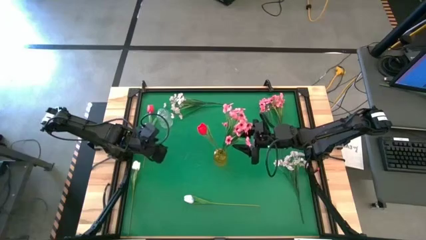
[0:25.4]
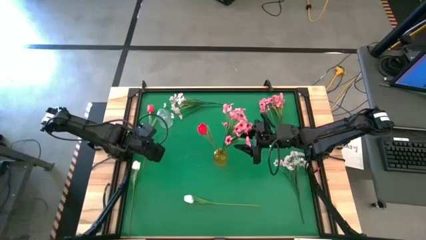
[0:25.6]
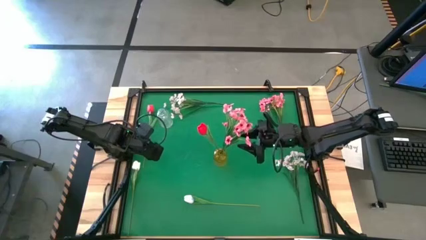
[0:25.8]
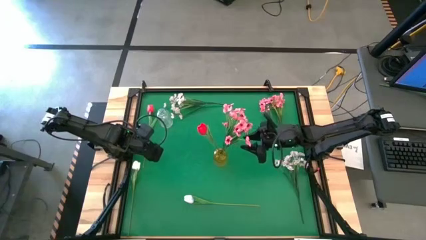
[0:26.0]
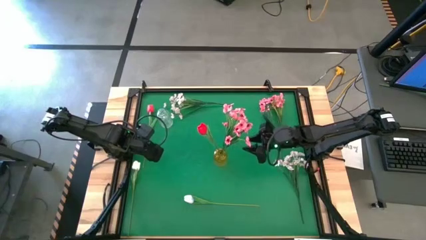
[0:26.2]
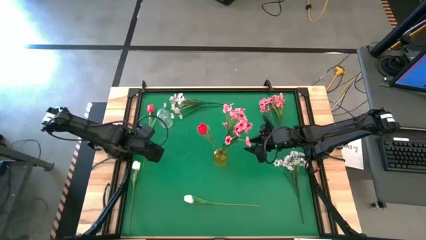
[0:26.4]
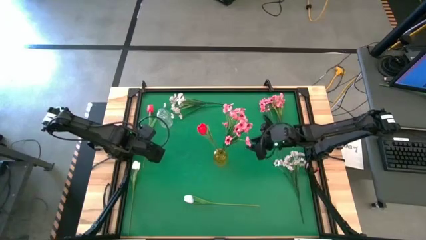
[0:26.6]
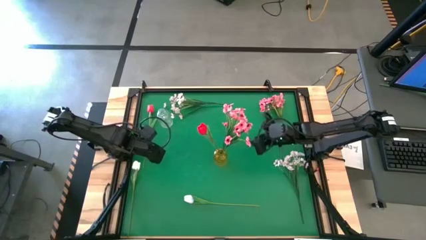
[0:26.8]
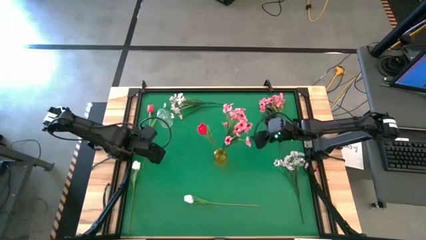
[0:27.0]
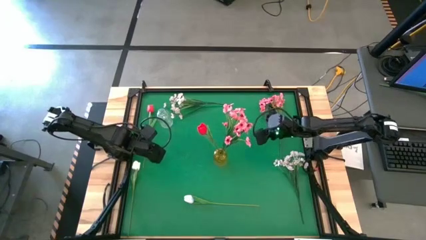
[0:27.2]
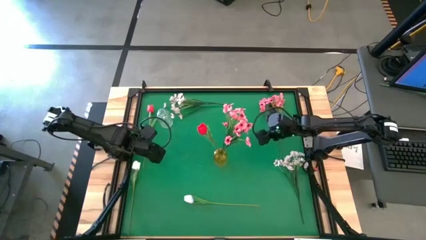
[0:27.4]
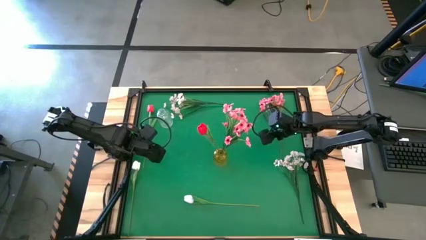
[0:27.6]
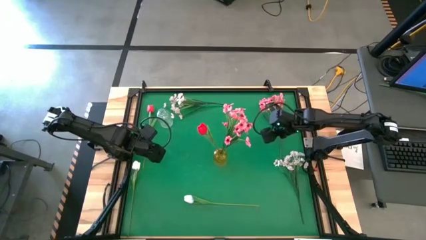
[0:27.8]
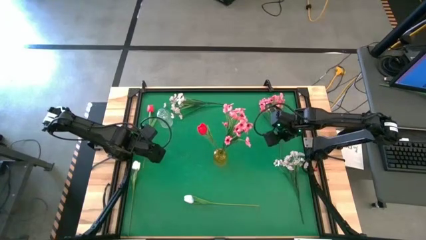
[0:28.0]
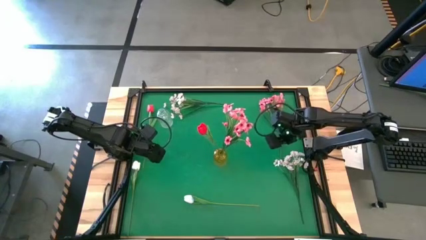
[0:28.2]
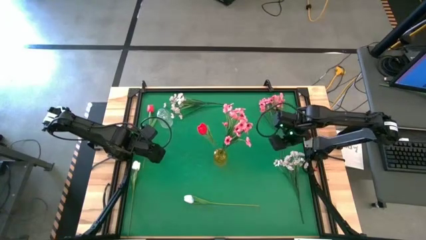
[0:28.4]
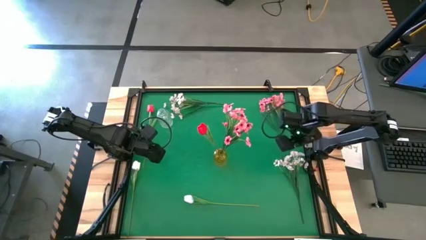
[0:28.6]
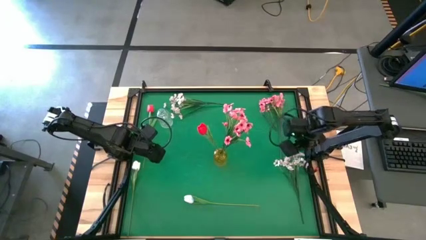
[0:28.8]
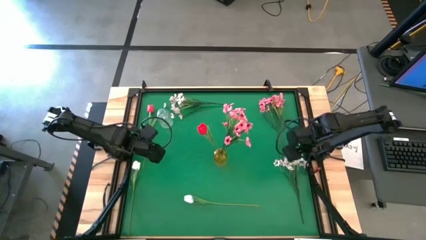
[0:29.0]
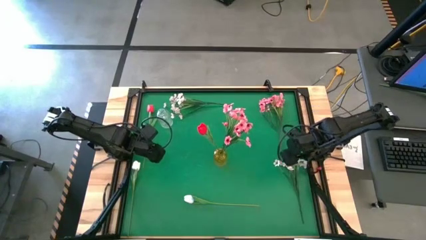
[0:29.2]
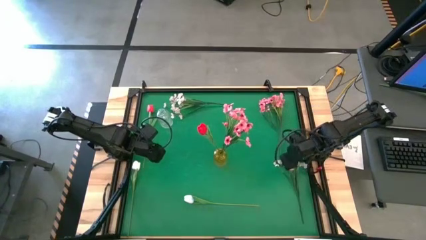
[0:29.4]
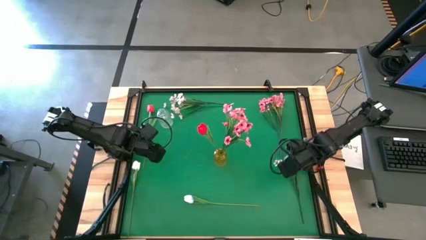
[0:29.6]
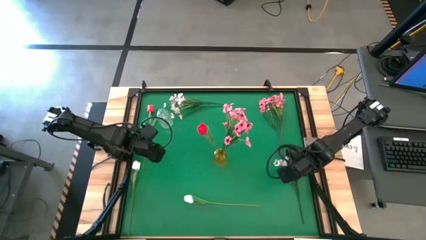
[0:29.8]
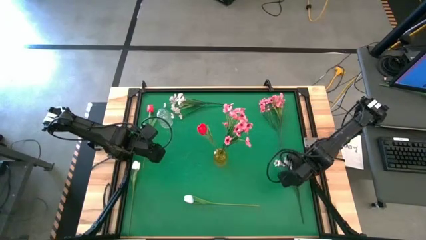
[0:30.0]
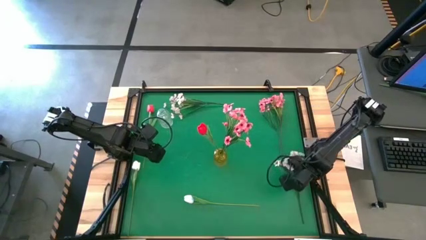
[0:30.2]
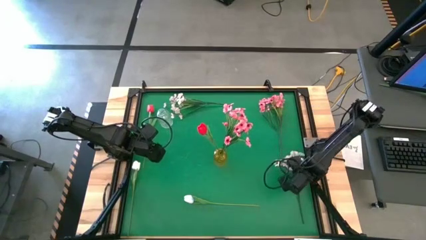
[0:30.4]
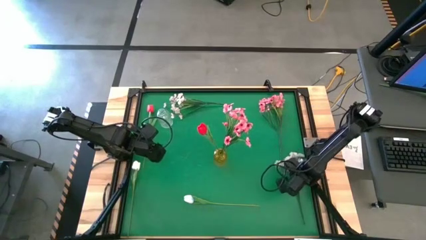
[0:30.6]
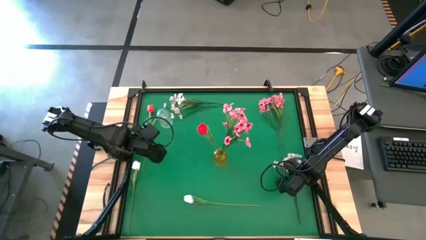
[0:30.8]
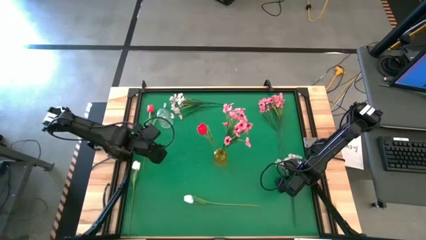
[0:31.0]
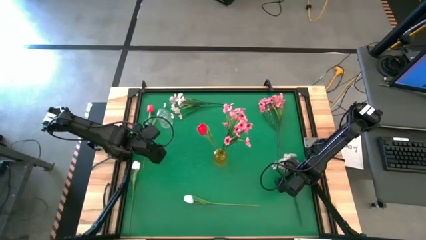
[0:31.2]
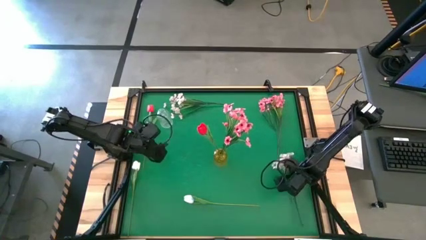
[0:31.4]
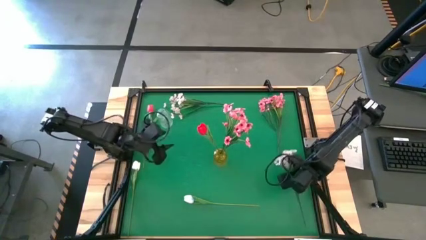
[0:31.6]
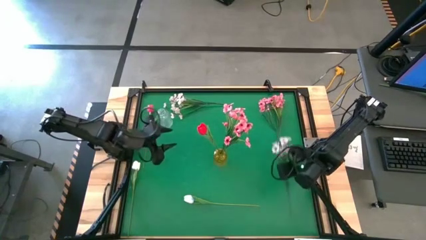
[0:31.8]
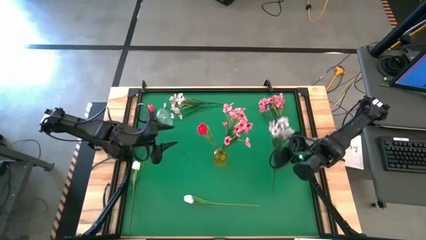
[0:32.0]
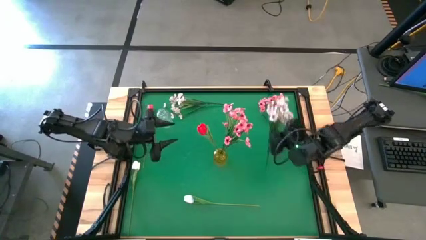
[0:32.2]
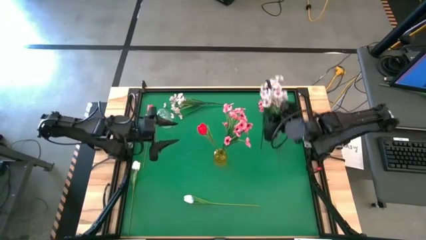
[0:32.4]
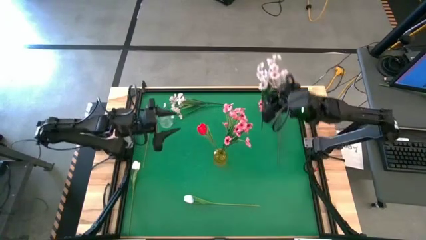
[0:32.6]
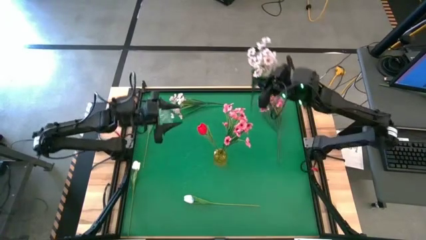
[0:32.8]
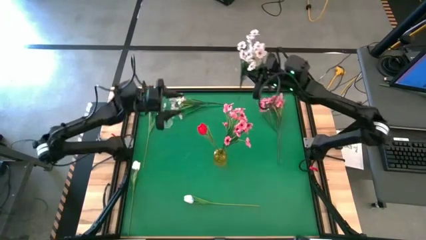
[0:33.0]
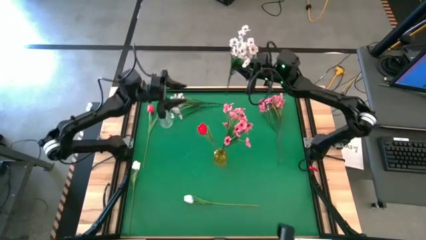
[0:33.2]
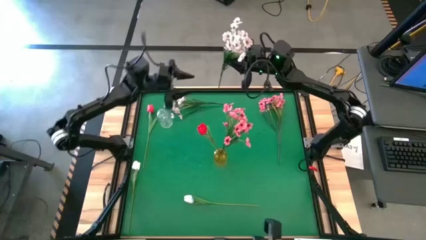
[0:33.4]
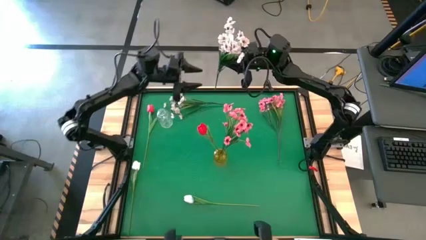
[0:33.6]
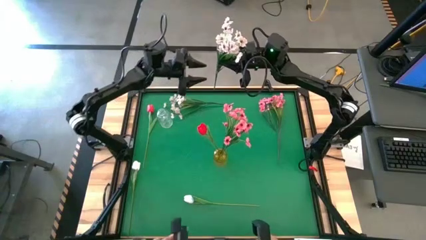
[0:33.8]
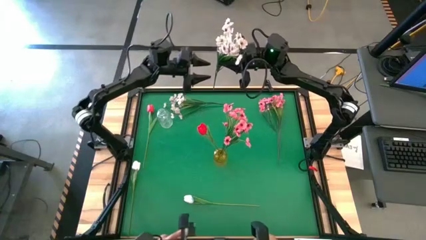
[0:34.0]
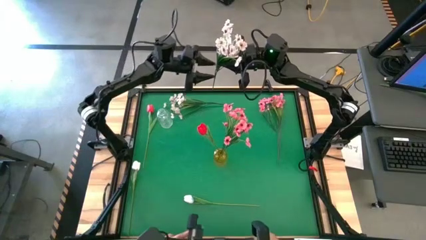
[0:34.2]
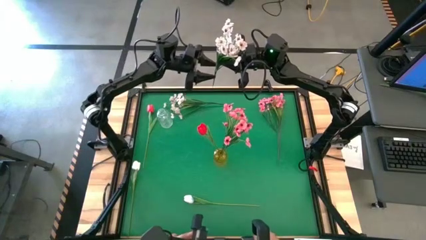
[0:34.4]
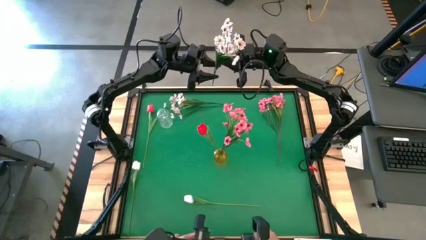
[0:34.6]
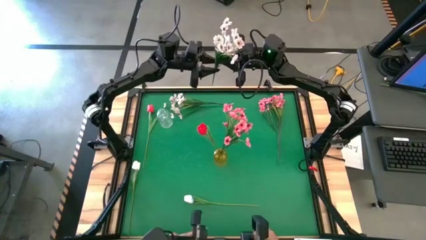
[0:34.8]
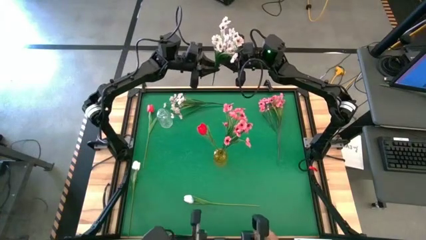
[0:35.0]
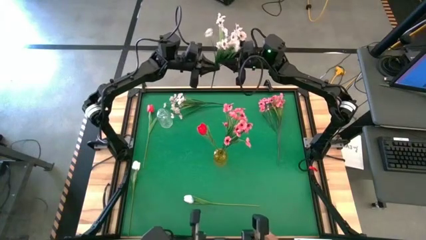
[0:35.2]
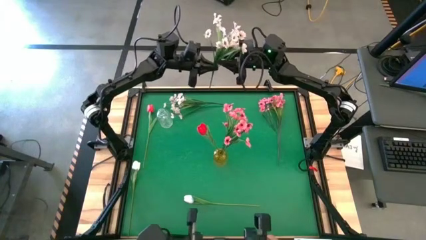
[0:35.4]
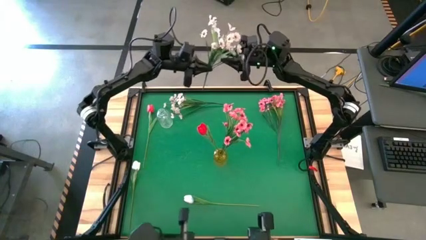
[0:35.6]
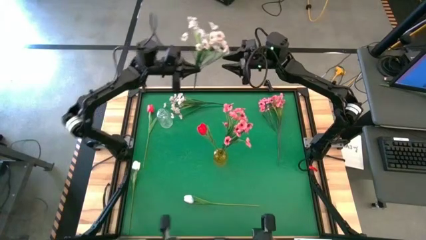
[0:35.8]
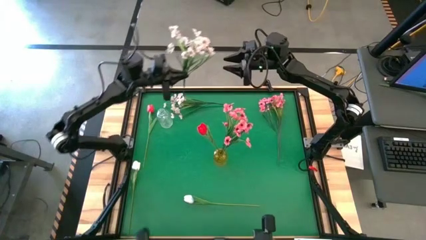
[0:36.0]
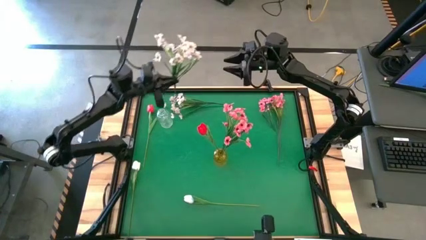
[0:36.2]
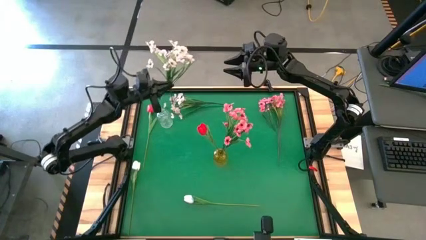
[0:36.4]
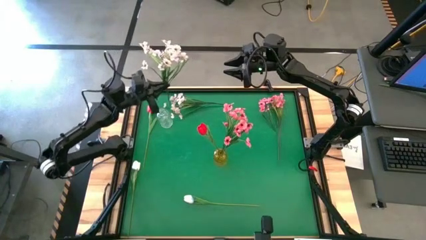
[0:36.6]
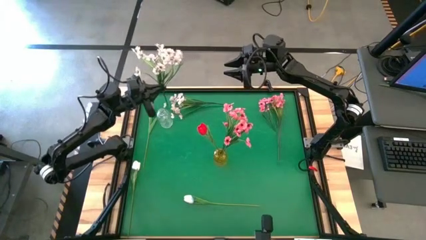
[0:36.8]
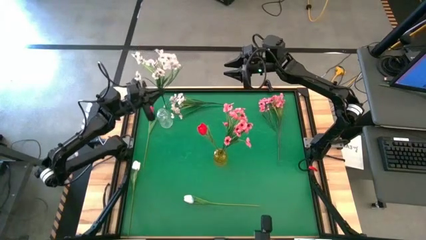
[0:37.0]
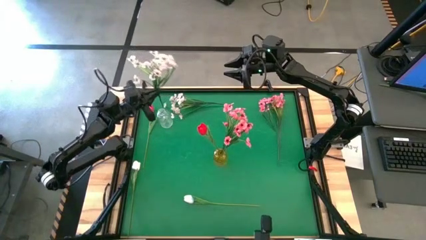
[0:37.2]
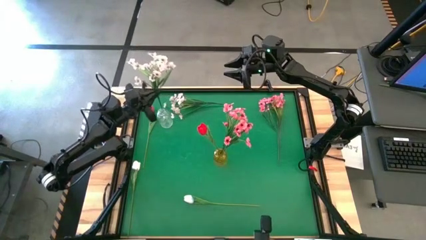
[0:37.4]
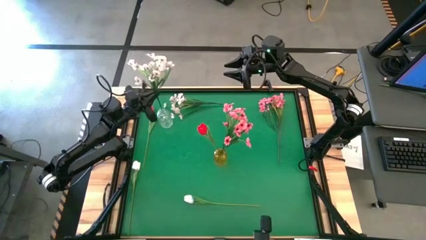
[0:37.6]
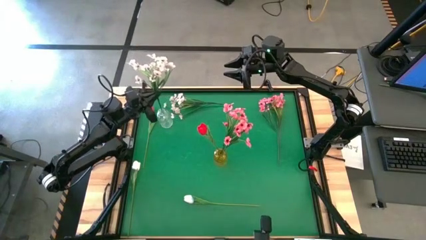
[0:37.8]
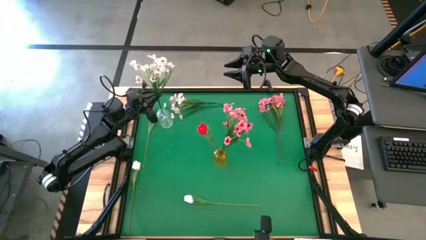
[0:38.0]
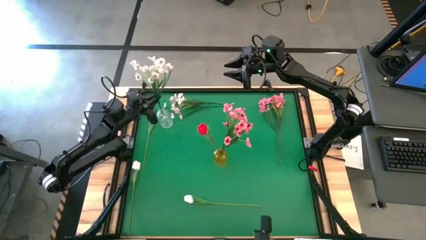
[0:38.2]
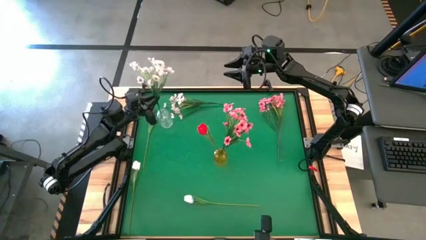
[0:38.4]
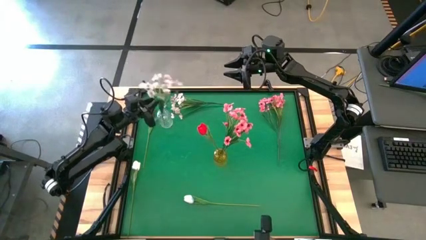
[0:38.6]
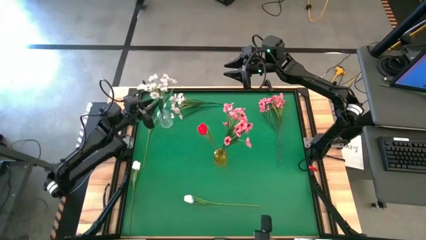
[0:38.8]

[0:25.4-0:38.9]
Task: Sort flowers into vase by color
Put the bottom white flowers into the transparent vase
